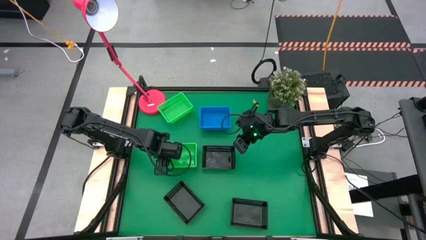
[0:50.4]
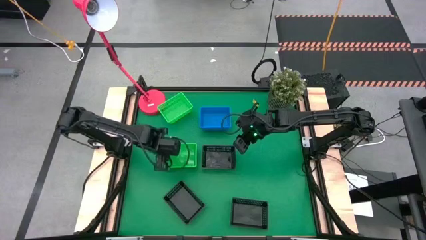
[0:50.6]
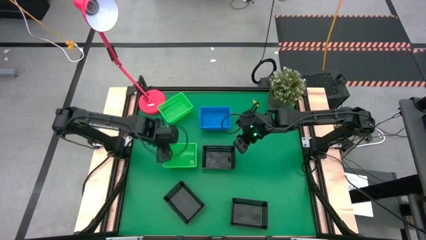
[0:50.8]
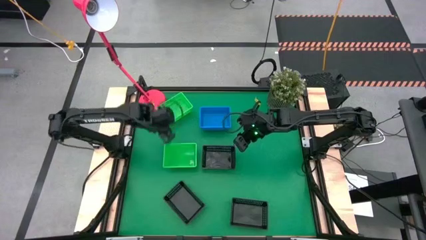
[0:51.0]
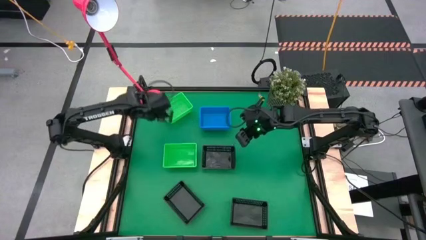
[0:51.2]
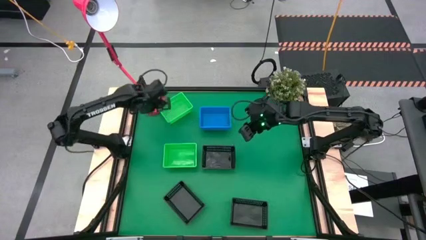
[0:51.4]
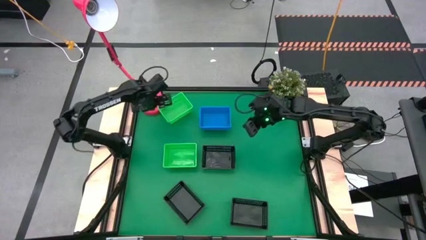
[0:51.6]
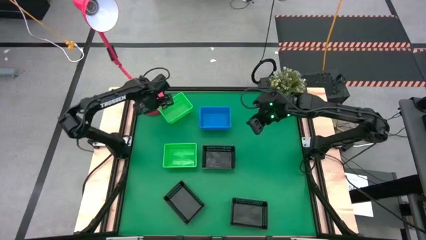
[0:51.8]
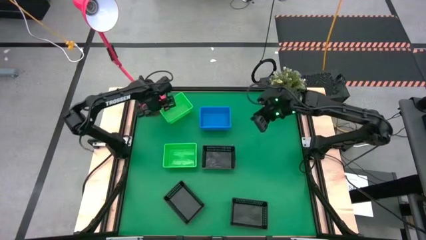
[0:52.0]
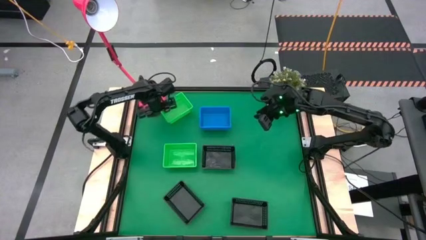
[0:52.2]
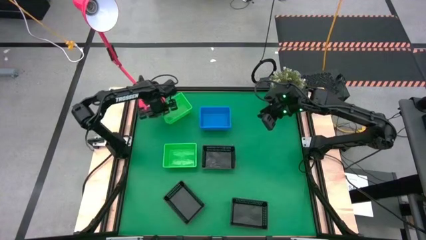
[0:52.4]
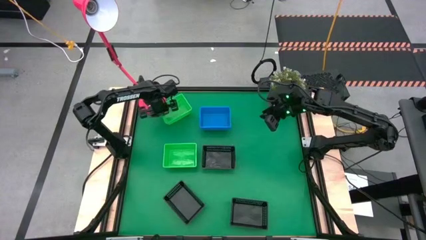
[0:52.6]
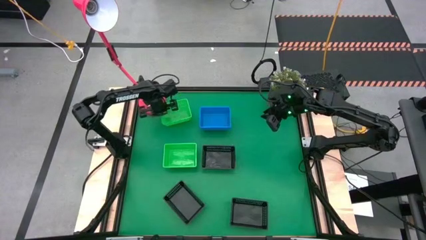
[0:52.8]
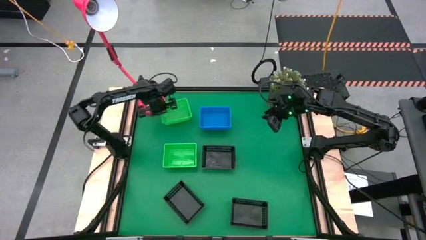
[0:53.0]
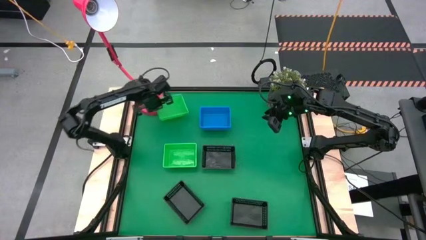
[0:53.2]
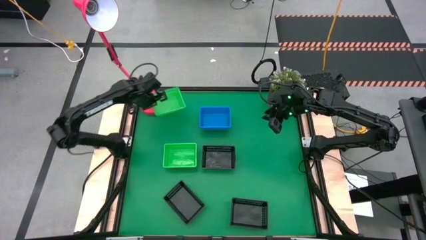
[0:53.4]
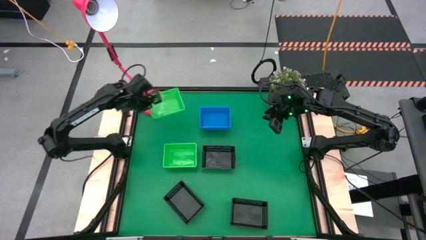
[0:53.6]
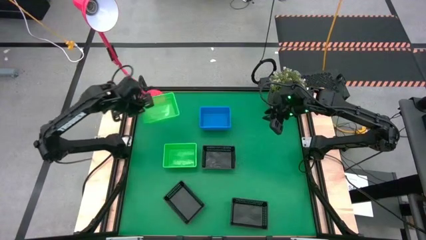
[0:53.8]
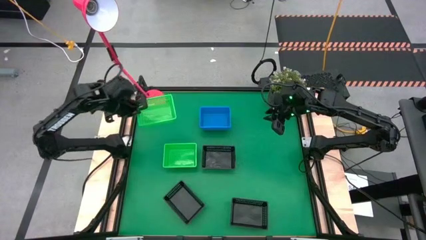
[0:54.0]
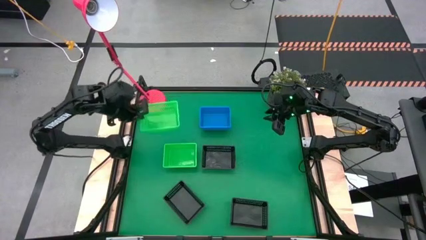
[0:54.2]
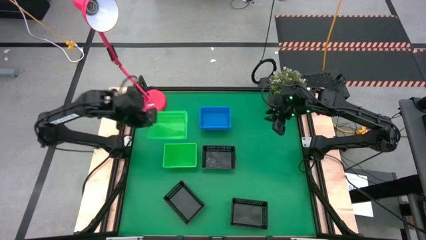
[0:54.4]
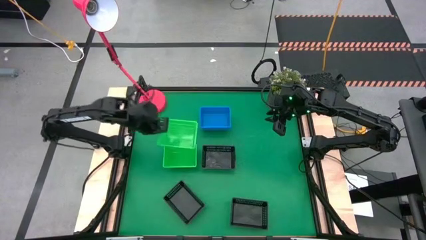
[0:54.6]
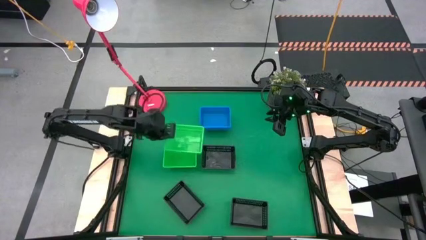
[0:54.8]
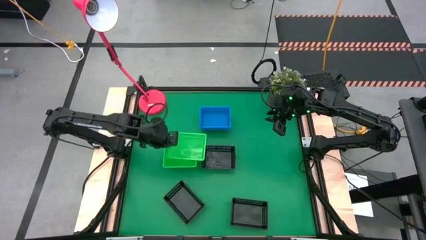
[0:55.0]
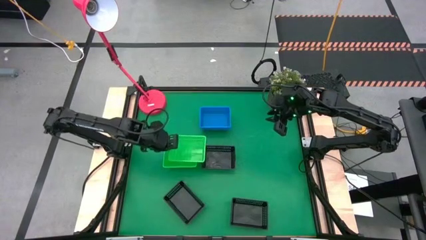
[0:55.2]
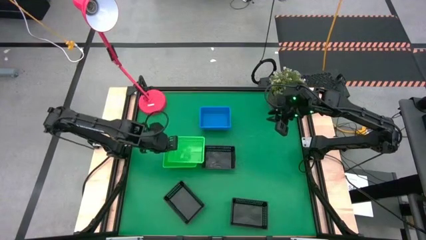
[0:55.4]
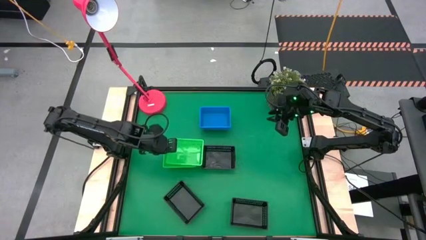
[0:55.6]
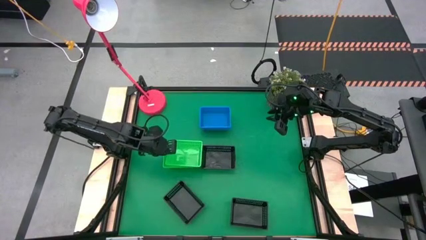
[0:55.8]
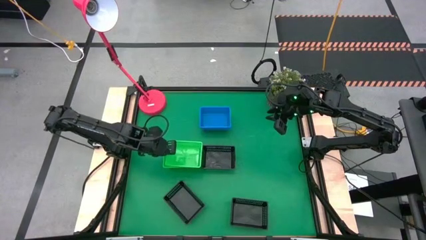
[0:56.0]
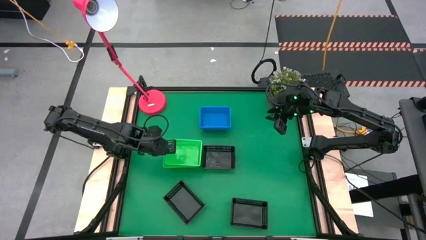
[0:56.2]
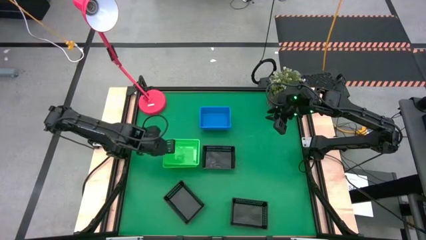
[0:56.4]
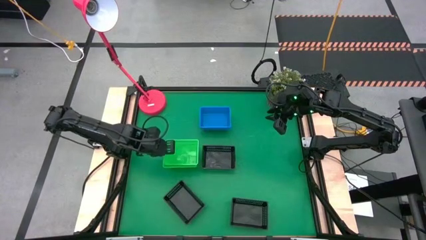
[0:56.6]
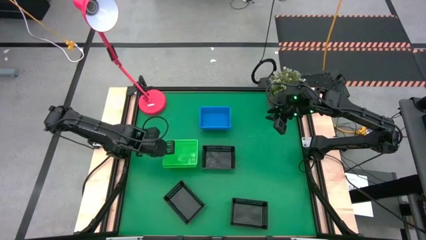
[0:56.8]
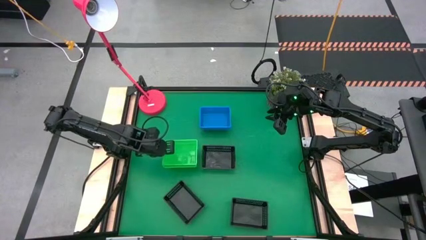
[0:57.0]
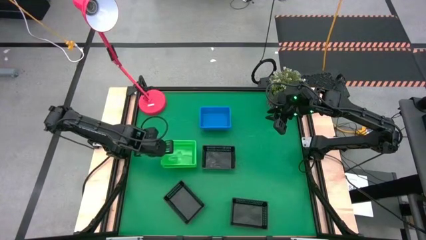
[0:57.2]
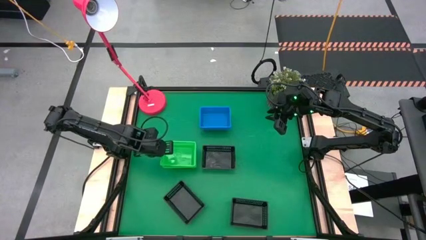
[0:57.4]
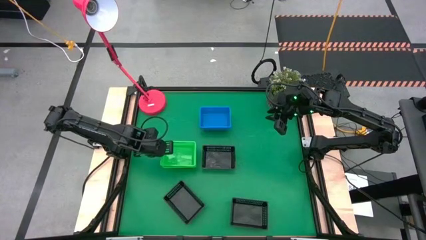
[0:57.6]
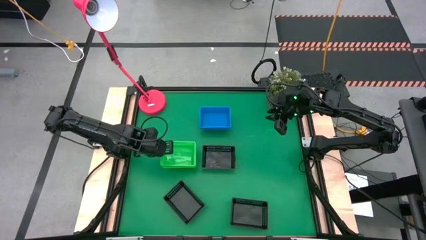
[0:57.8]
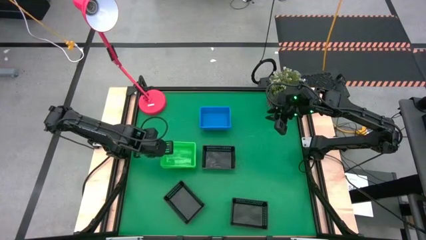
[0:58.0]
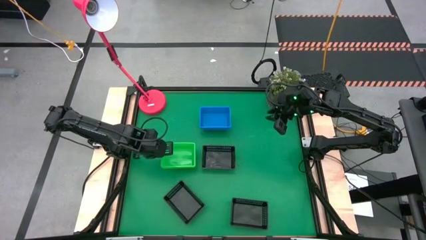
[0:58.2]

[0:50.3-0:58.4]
Stack the top green bin on the top of the bottom stacked green bins

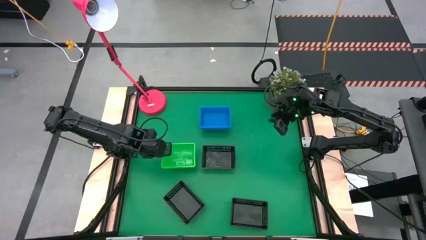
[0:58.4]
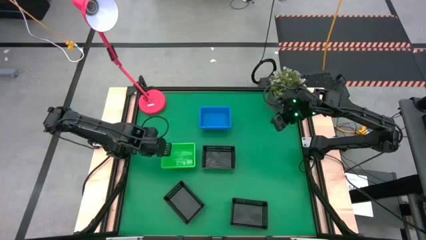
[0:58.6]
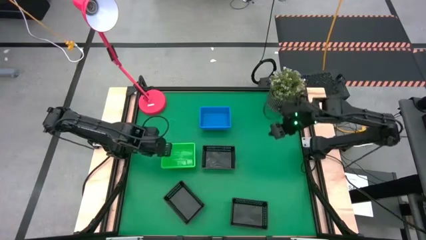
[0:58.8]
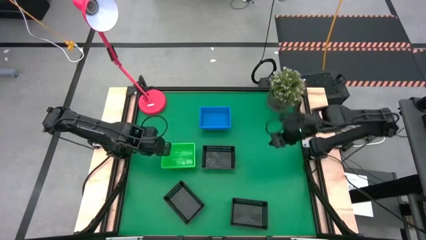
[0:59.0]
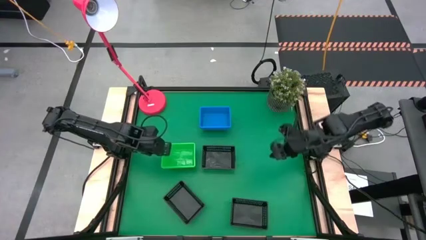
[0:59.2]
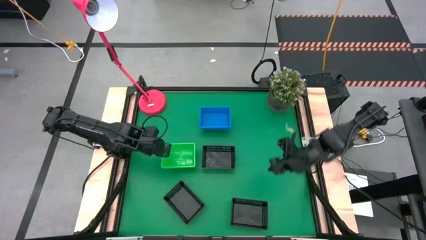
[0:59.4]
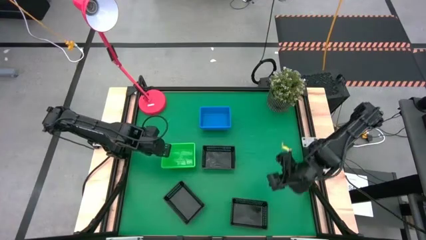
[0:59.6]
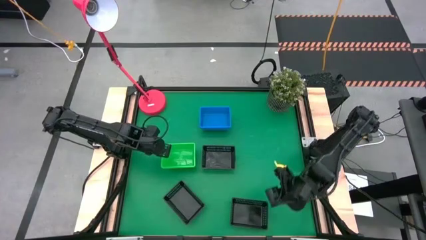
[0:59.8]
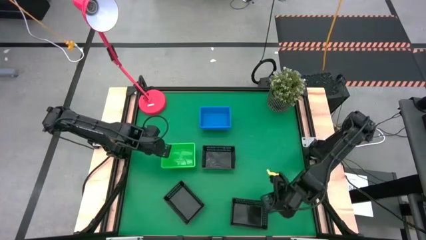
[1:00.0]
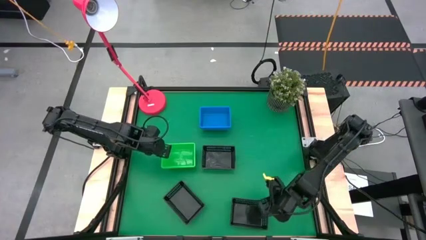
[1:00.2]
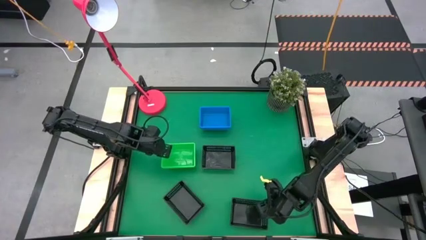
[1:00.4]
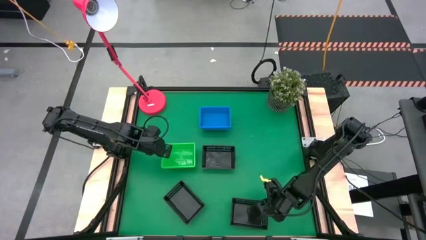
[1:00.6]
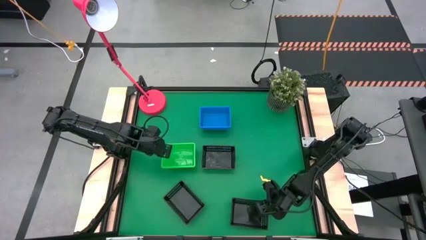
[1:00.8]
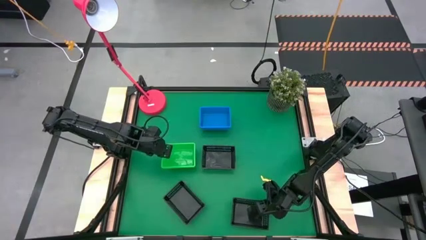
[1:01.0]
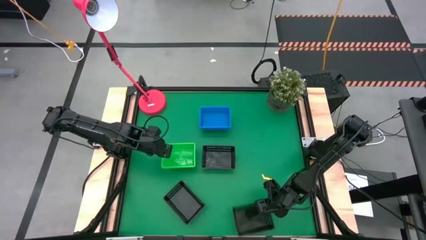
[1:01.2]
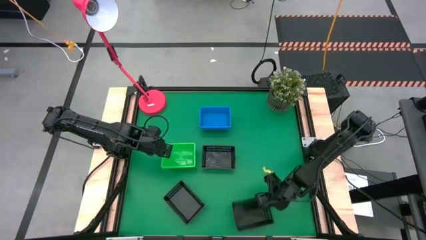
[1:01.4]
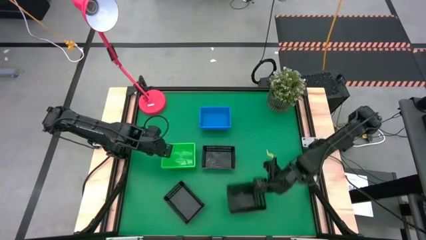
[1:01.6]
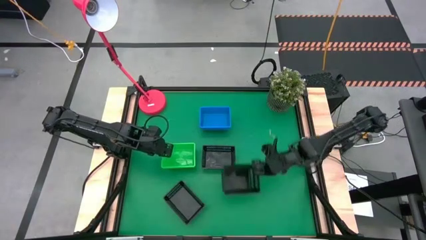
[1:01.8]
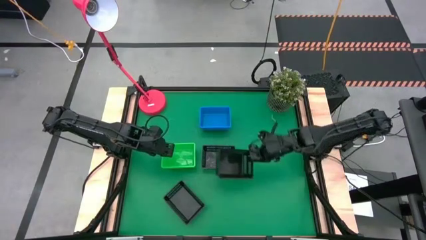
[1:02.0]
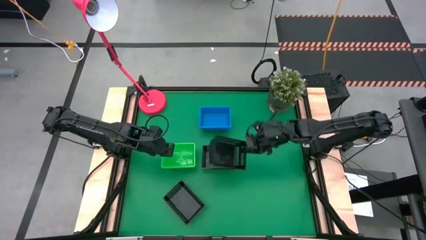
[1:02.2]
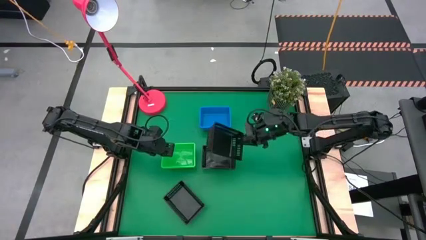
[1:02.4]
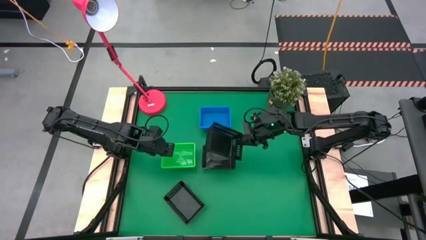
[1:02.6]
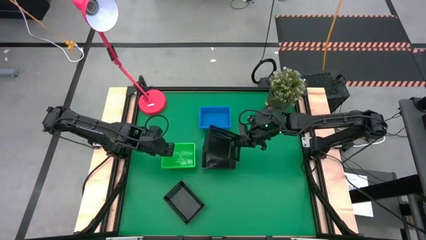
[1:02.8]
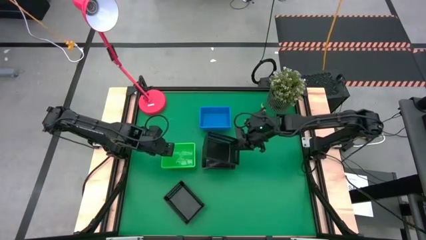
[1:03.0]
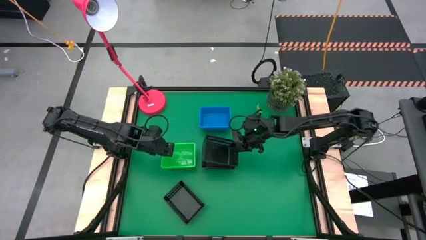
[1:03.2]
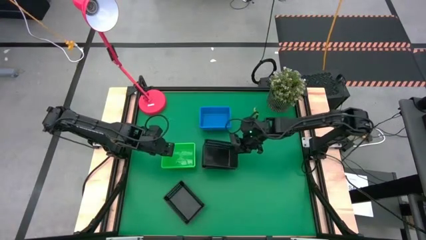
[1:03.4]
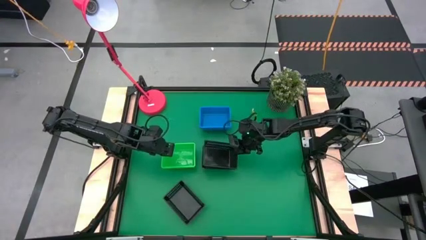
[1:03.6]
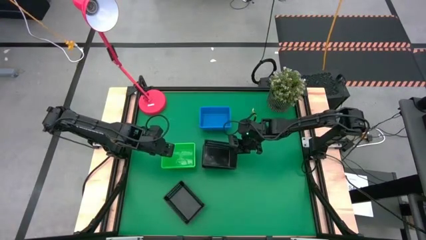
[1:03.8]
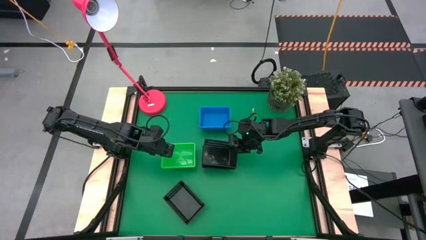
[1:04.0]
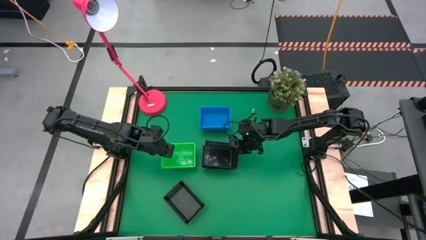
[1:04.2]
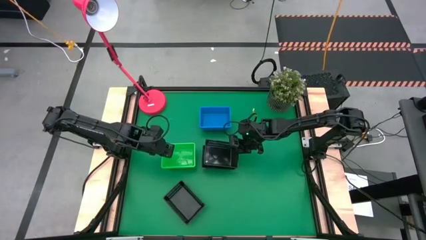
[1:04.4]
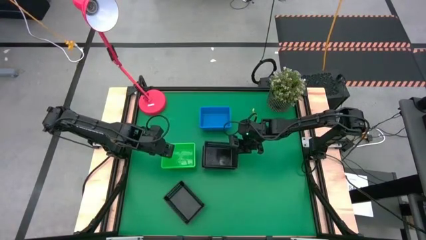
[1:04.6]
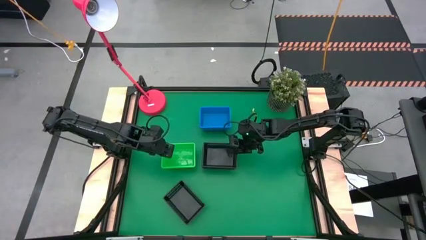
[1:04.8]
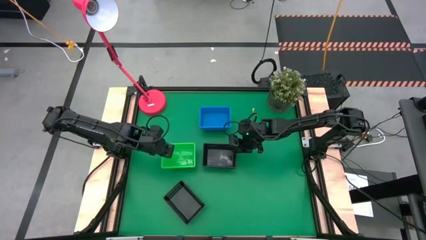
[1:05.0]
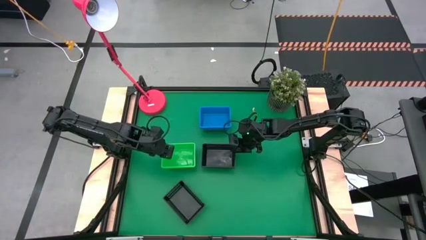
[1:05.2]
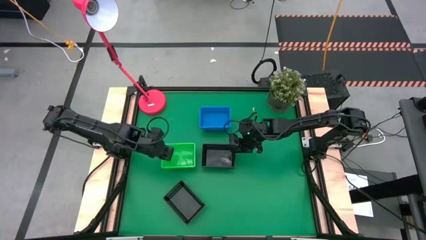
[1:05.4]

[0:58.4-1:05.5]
Stack the bottom right black bin on the top of the top black bin
